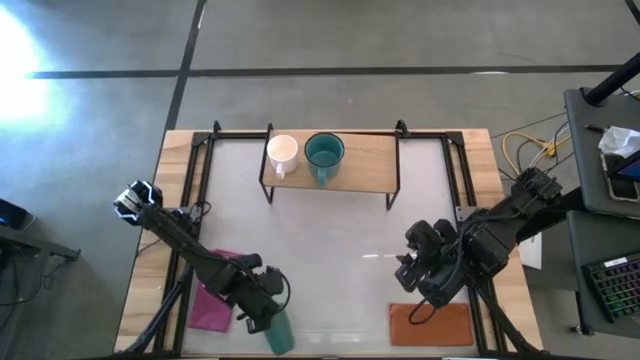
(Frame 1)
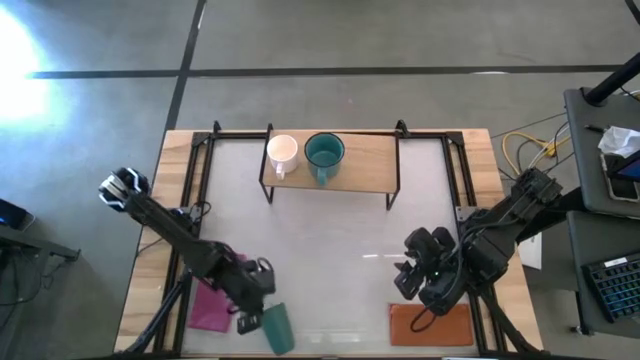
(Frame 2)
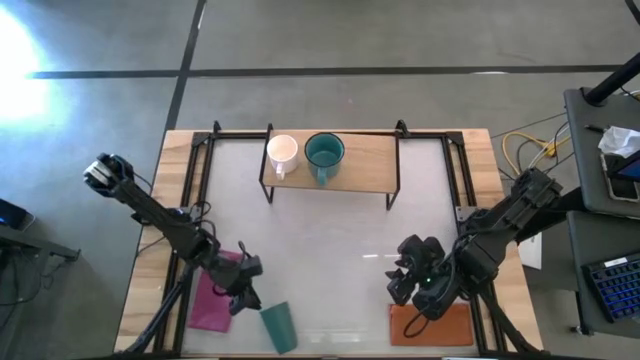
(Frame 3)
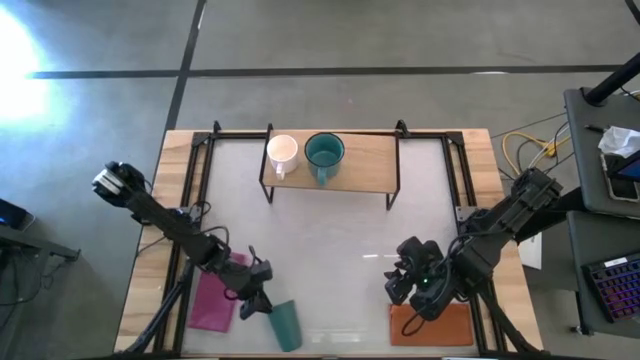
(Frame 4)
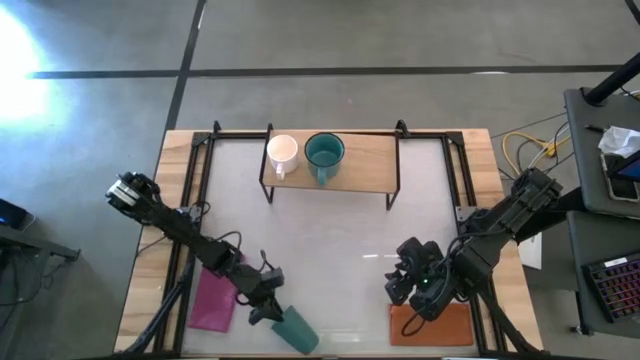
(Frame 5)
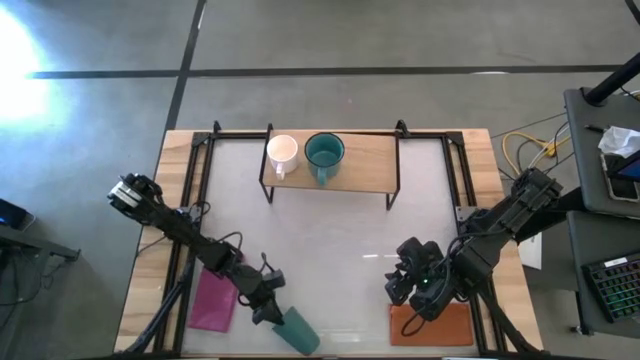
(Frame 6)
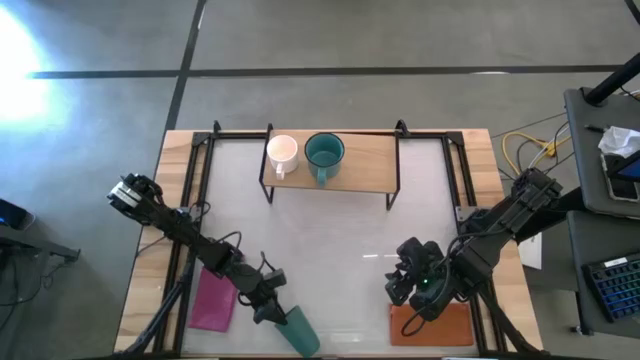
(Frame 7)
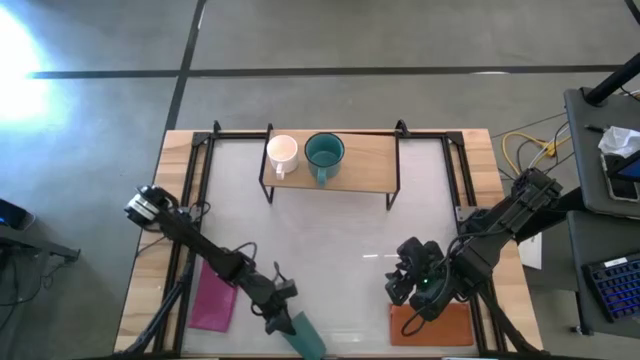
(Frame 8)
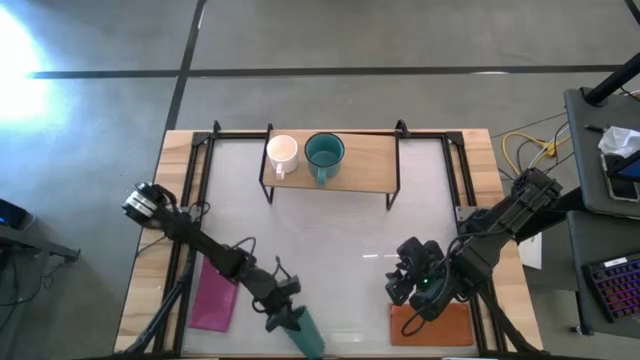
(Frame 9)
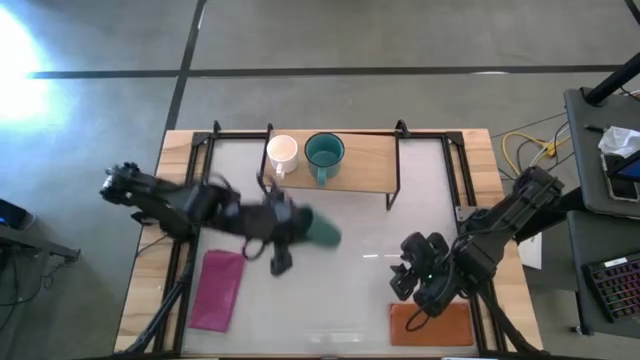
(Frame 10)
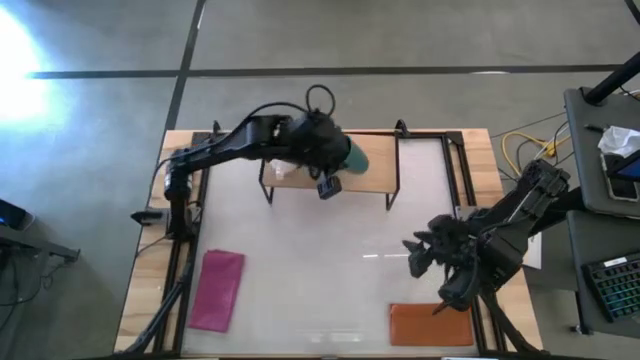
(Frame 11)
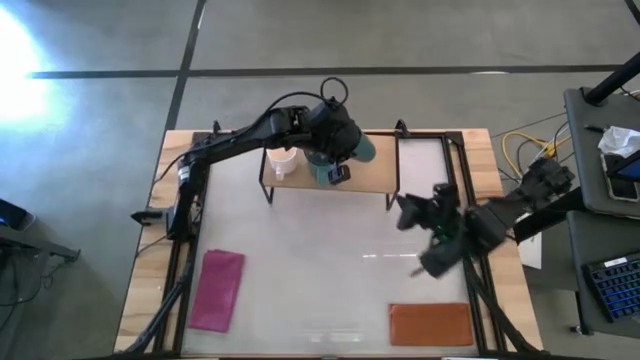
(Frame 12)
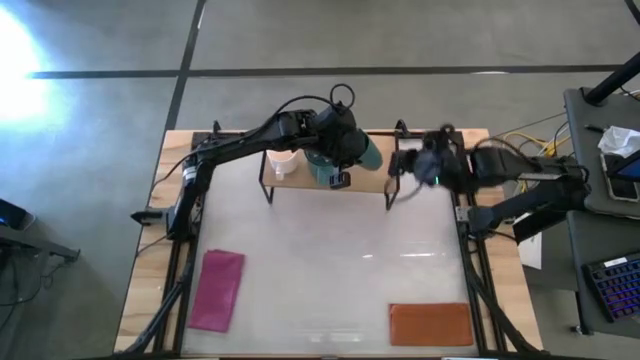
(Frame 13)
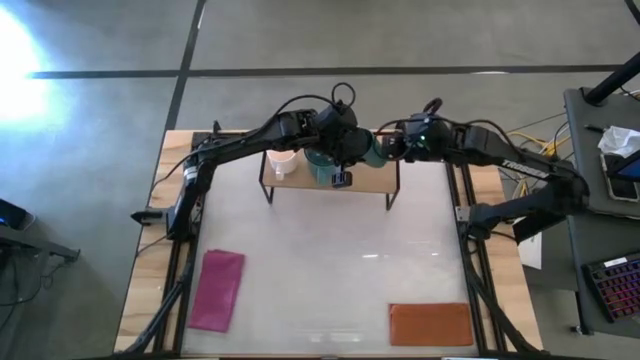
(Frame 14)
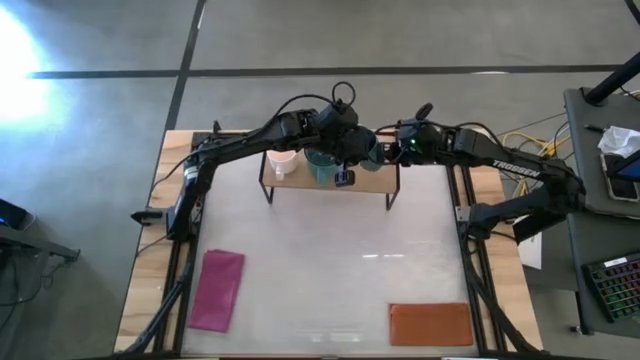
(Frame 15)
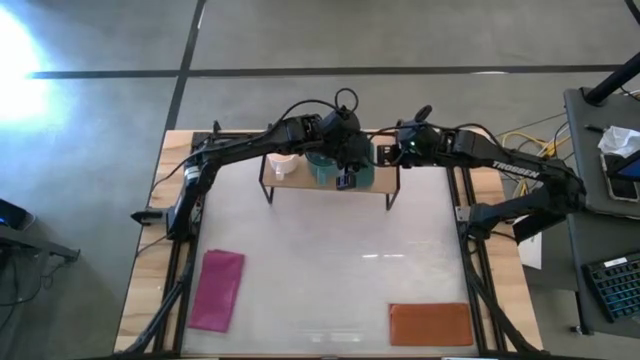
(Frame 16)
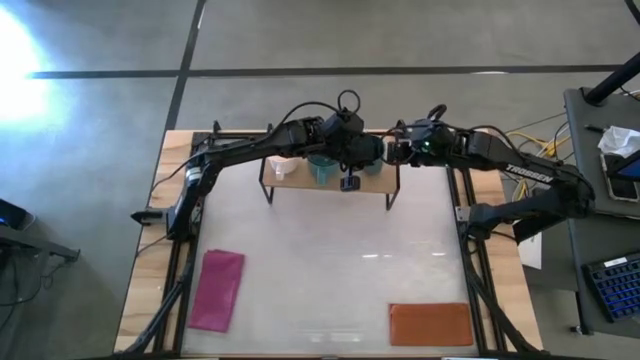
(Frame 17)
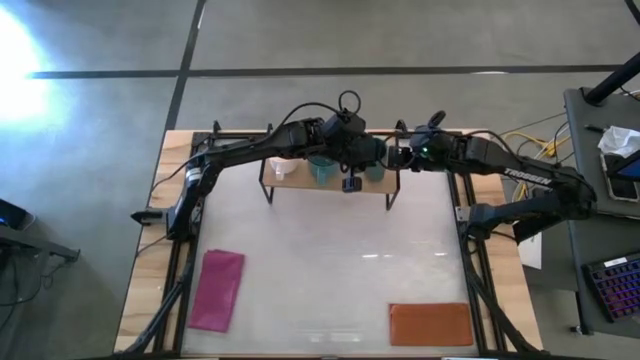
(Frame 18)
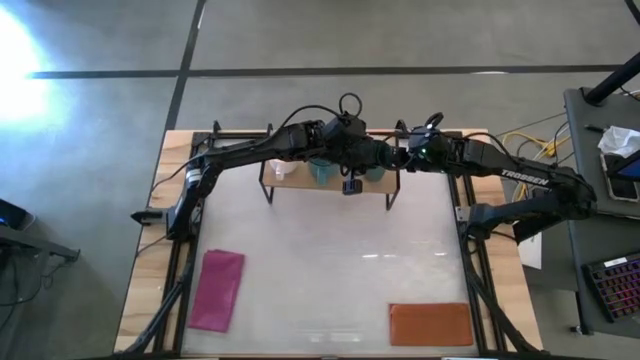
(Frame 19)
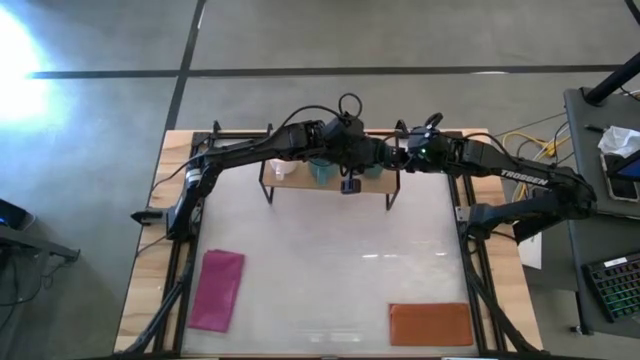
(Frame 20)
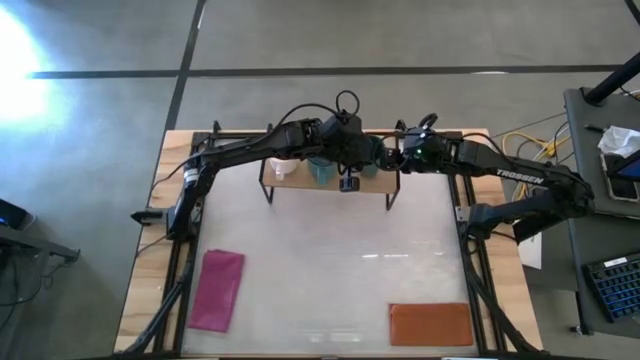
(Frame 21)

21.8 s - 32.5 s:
Task: Stack small to large cups/mugs on shelf
Put the green cup on the shelf

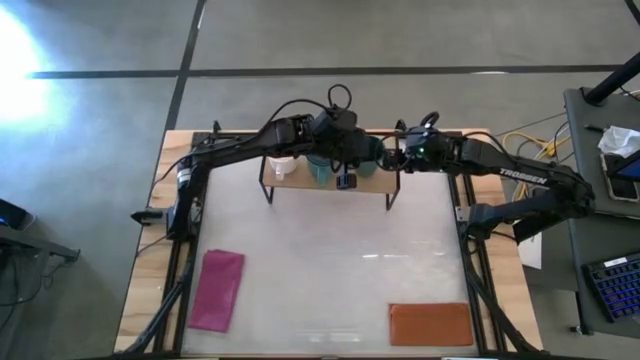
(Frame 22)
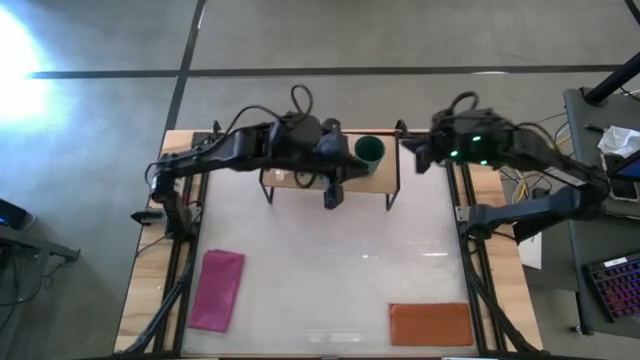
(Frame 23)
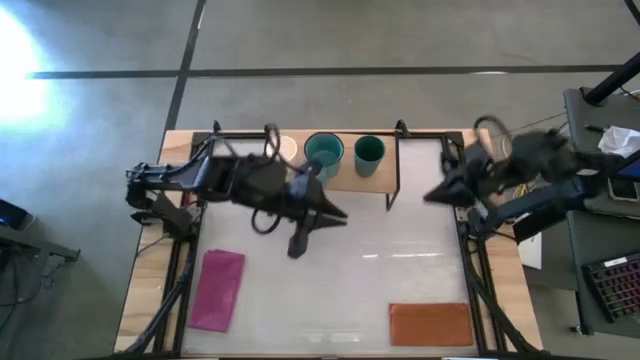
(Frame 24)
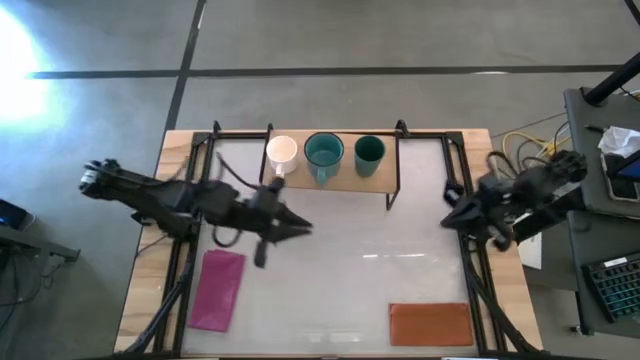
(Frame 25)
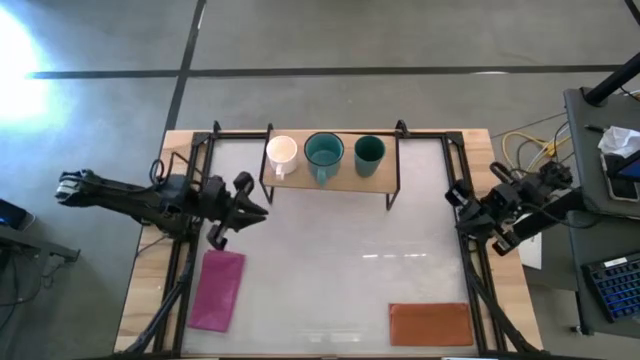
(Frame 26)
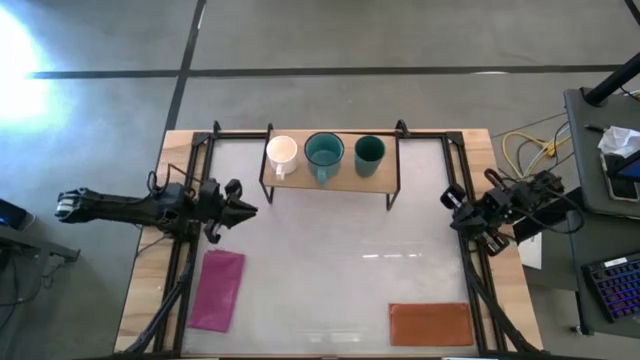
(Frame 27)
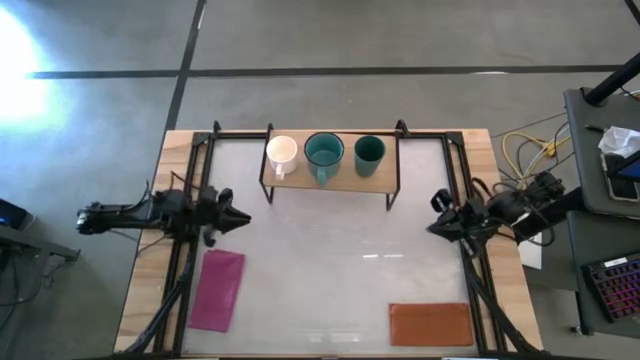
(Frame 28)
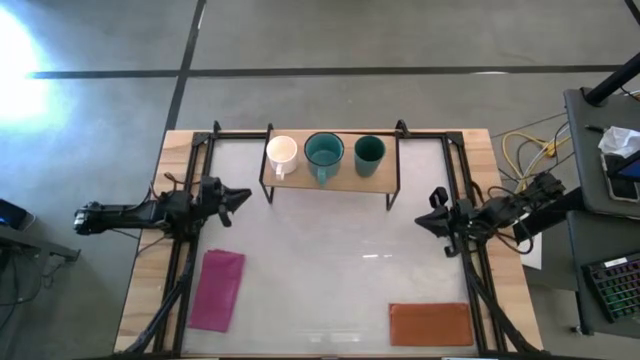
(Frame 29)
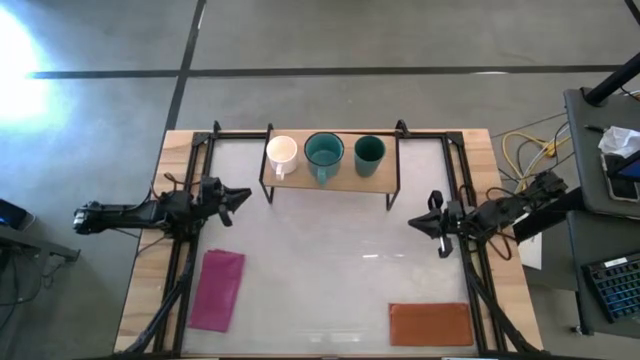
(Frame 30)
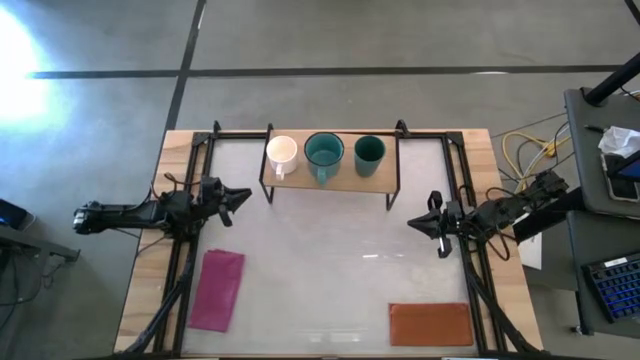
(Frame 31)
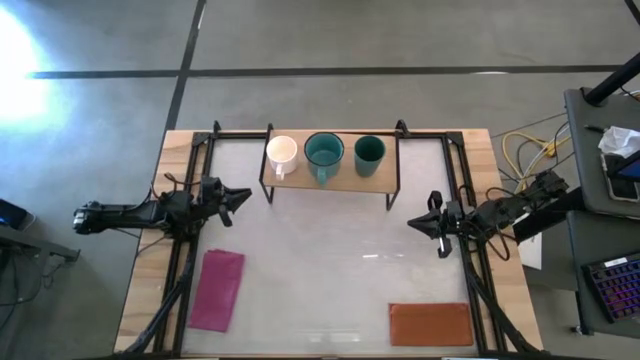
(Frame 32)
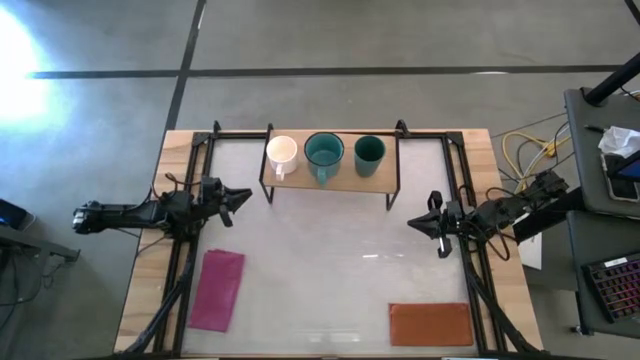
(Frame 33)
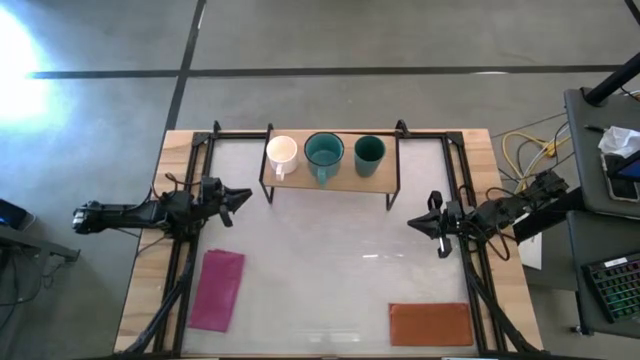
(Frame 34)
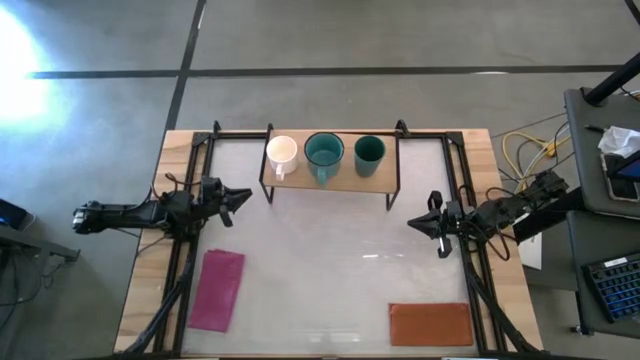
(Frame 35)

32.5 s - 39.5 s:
Return to Home Position

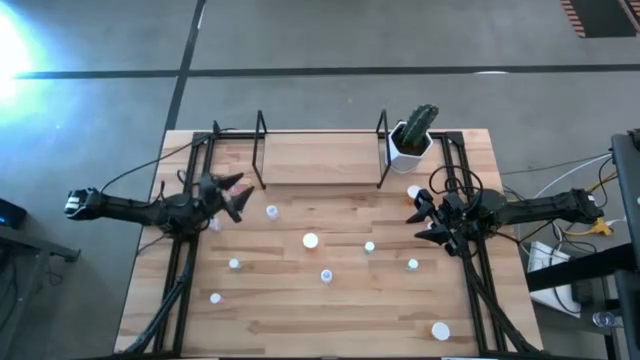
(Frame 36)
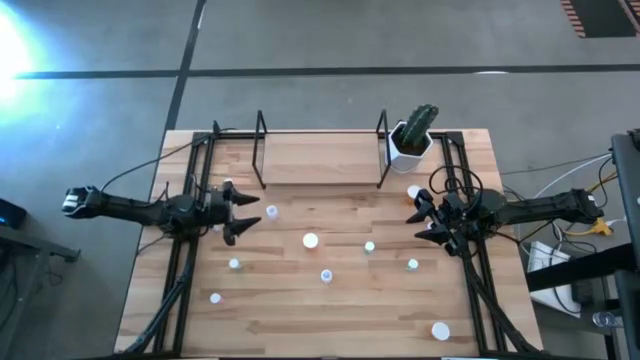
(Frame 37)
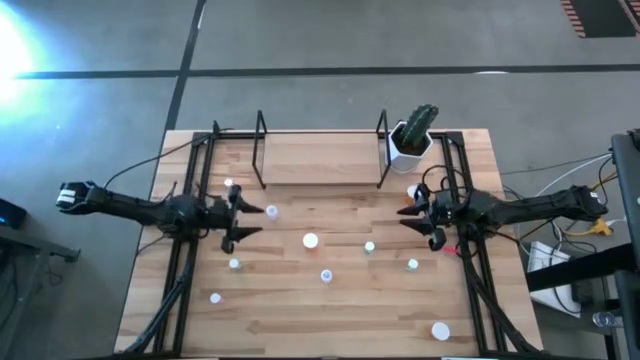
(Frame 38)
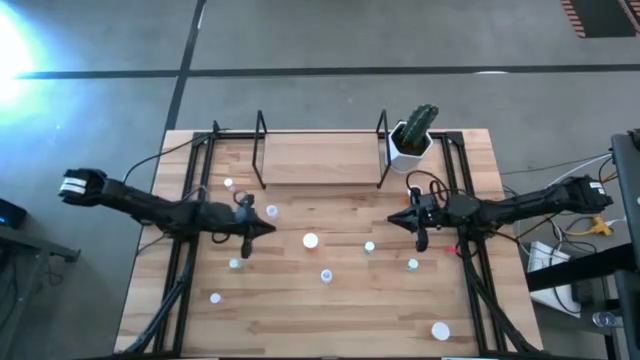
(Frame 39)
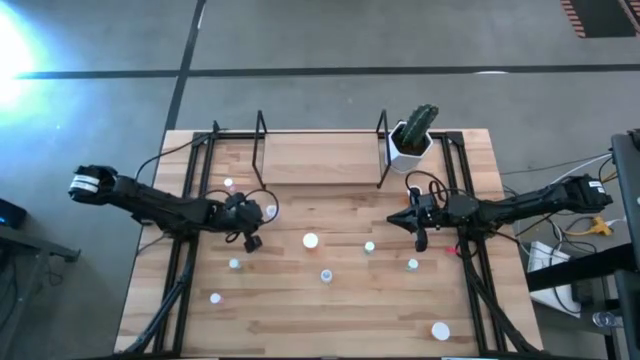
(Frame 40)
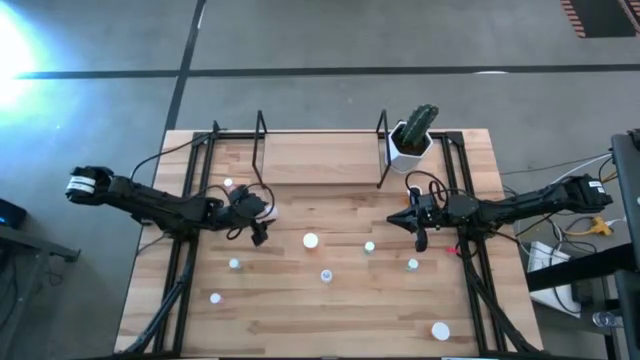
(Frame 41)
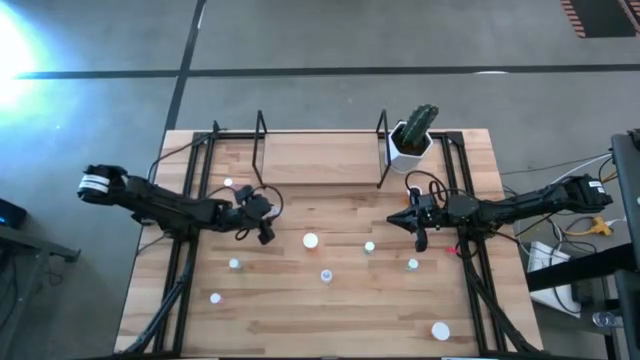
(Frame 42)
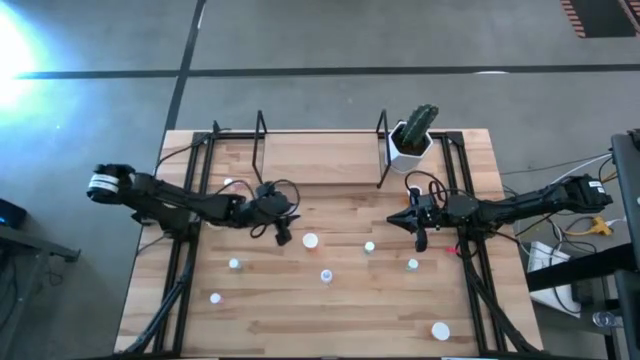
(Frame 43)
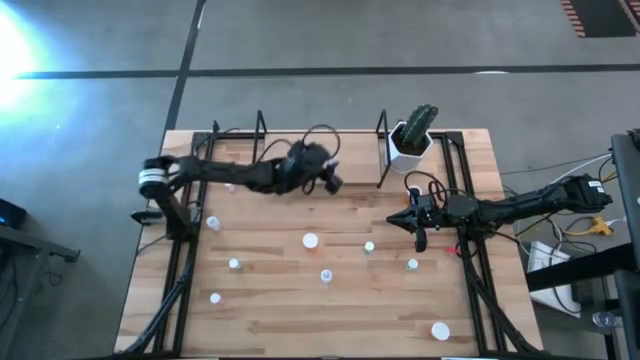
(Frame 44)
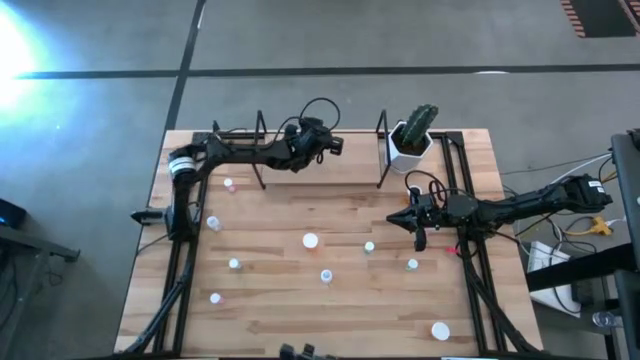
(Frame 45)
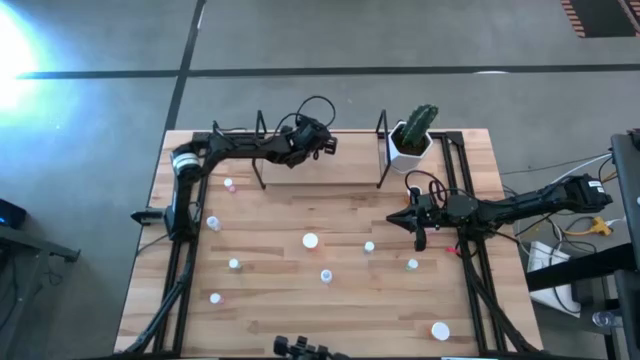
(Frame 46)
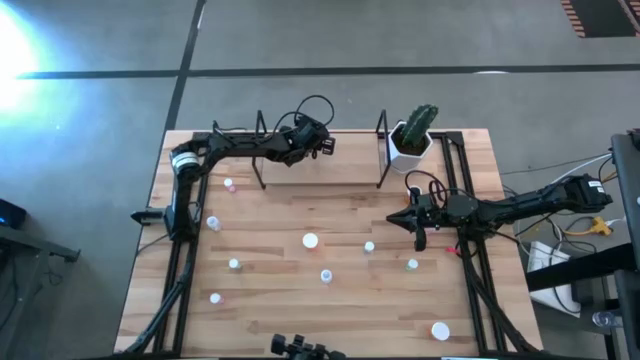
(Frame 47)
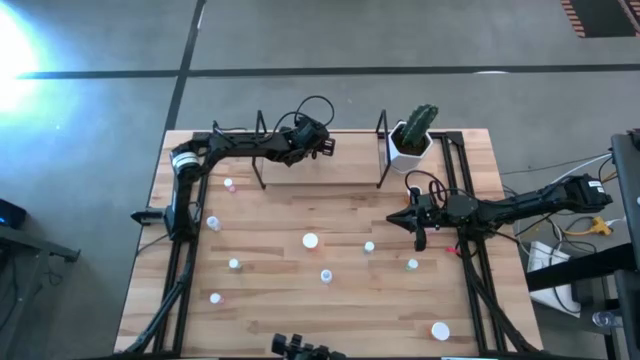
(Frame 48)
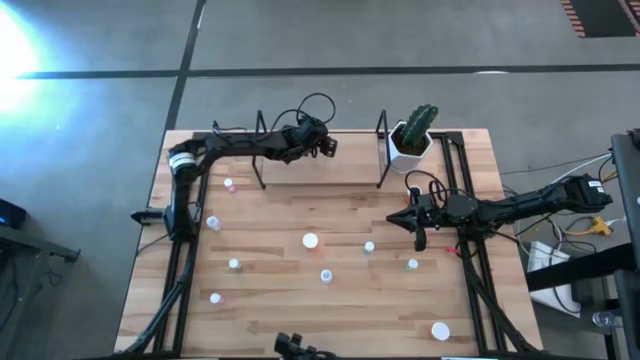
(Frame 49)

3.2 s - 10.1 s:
Task: Pick and place medicine bottles onto shelf by color
Put the top right transparent medicine bottle on the shelf
